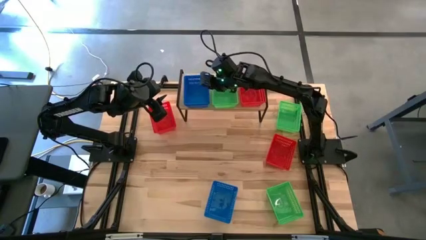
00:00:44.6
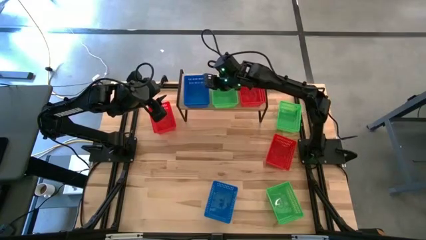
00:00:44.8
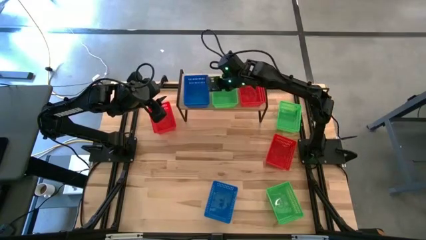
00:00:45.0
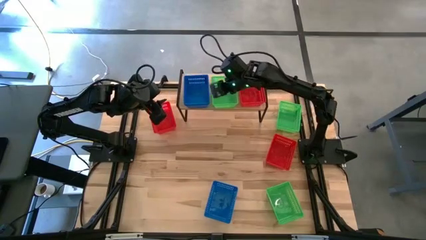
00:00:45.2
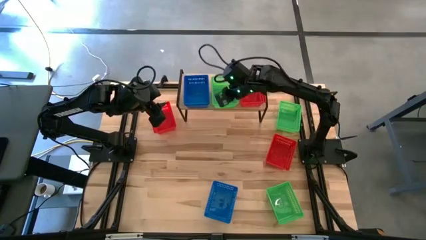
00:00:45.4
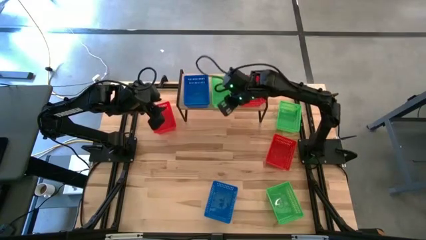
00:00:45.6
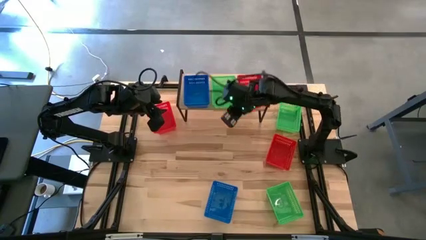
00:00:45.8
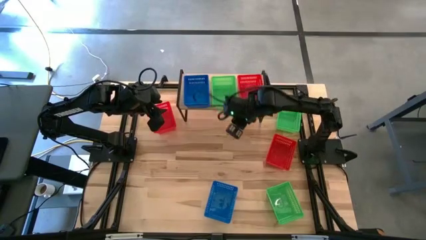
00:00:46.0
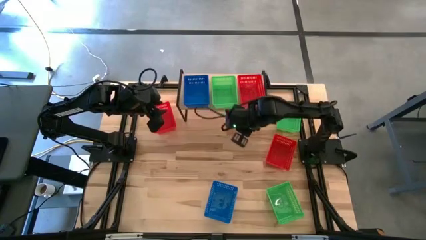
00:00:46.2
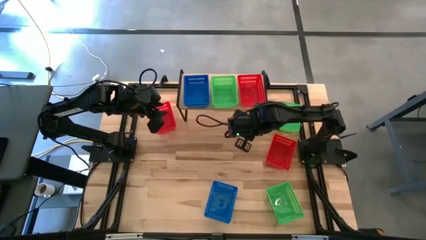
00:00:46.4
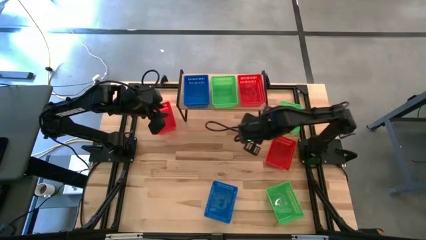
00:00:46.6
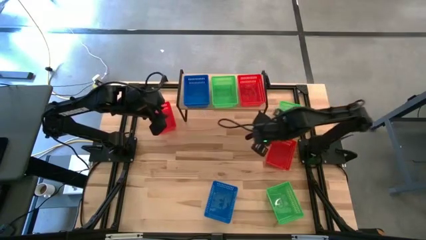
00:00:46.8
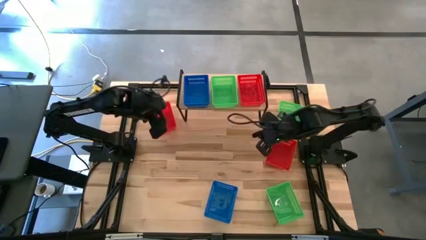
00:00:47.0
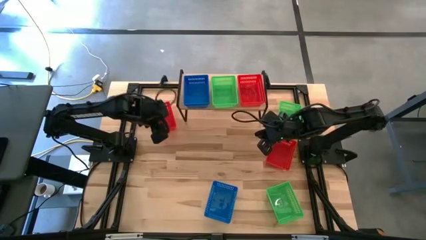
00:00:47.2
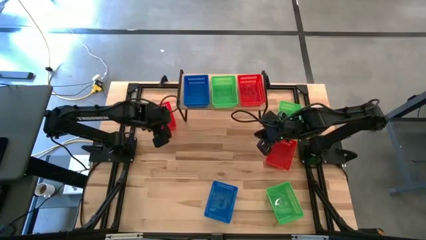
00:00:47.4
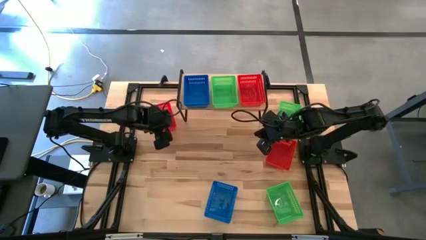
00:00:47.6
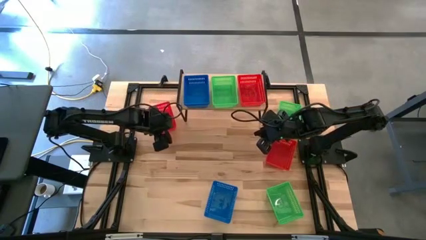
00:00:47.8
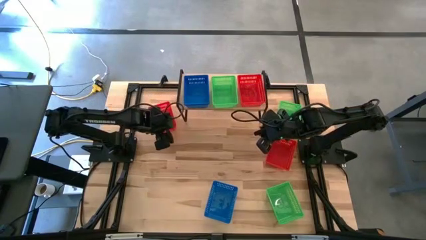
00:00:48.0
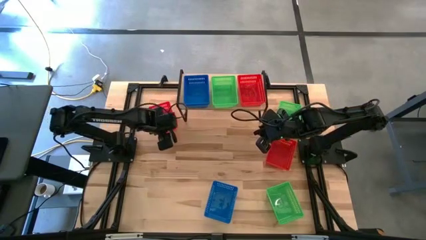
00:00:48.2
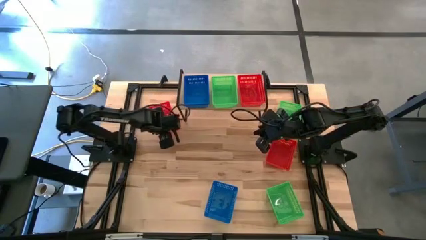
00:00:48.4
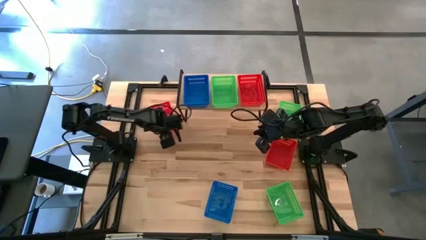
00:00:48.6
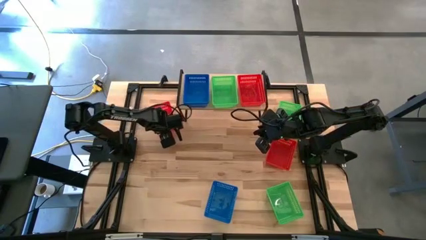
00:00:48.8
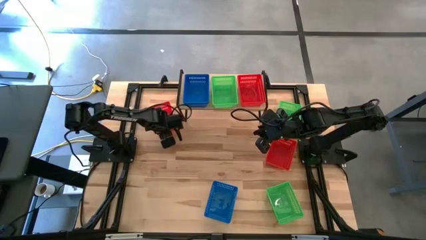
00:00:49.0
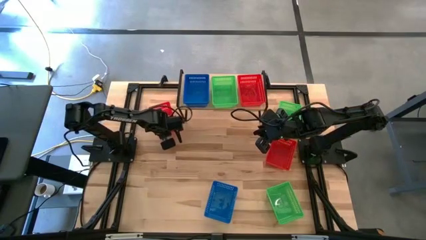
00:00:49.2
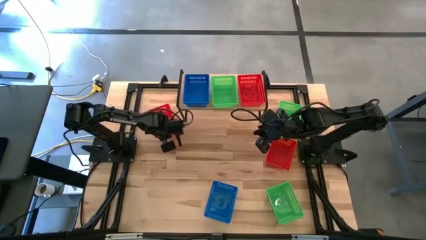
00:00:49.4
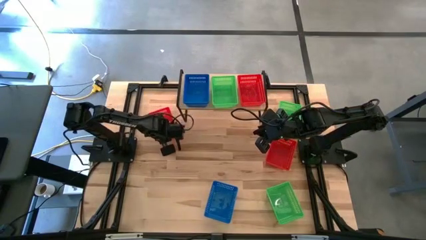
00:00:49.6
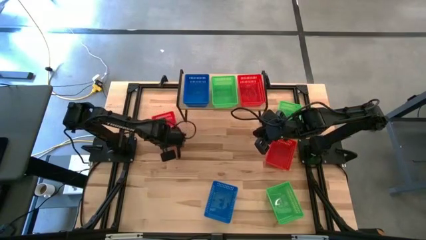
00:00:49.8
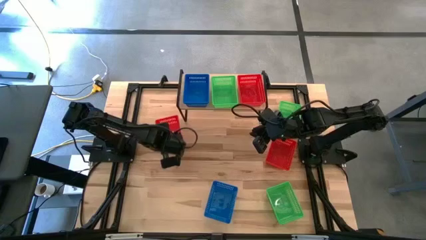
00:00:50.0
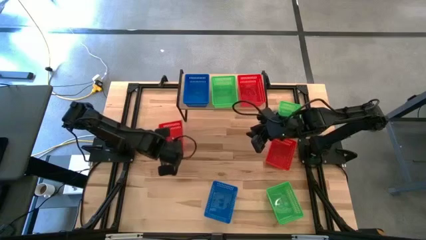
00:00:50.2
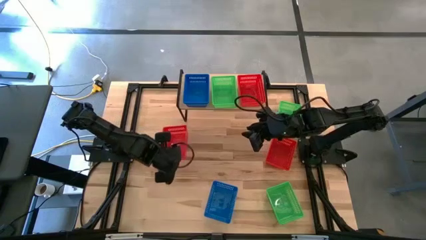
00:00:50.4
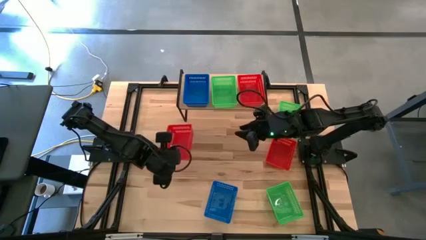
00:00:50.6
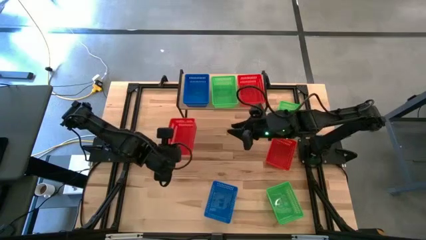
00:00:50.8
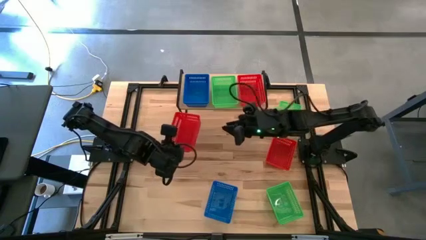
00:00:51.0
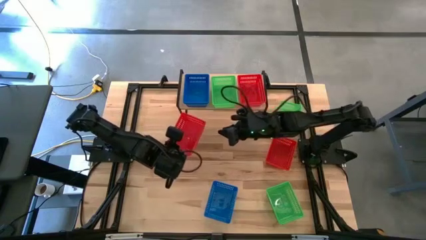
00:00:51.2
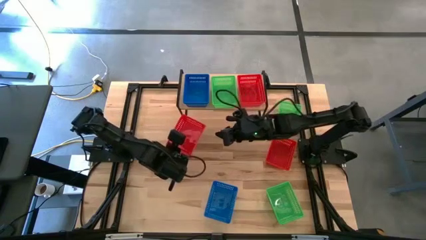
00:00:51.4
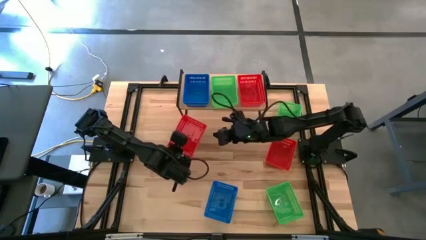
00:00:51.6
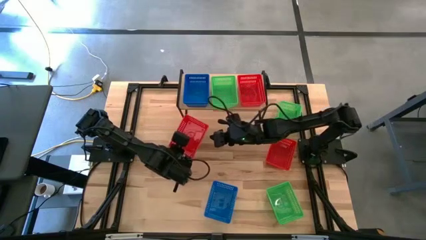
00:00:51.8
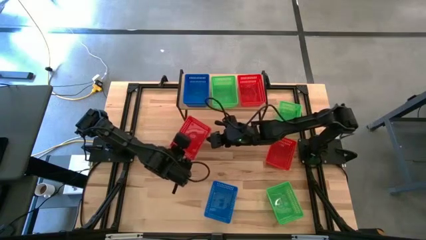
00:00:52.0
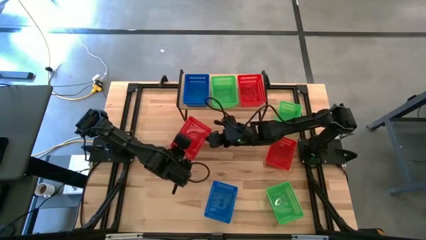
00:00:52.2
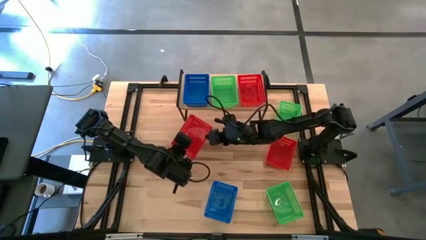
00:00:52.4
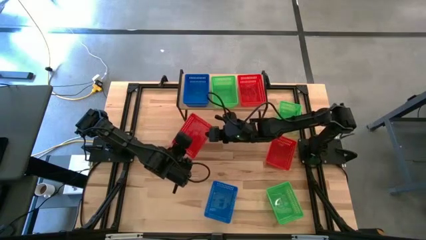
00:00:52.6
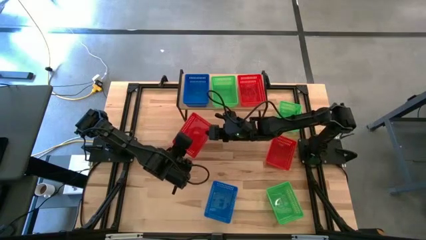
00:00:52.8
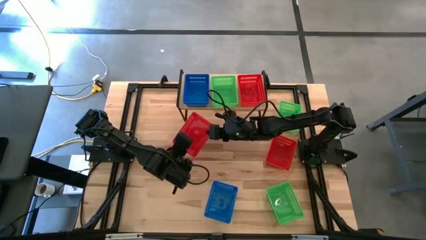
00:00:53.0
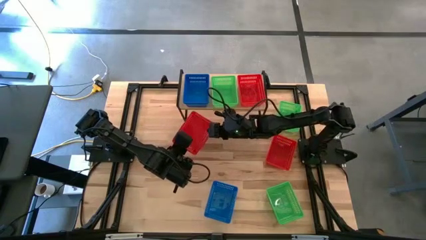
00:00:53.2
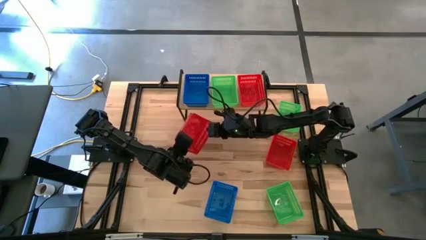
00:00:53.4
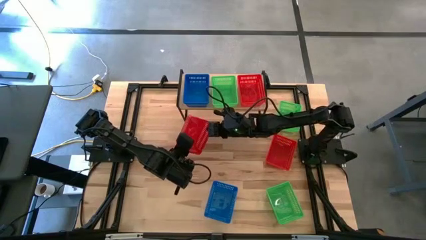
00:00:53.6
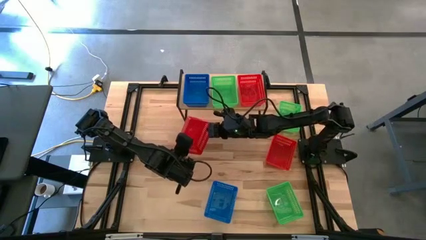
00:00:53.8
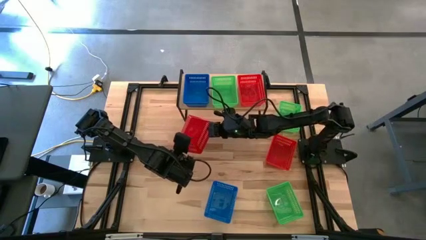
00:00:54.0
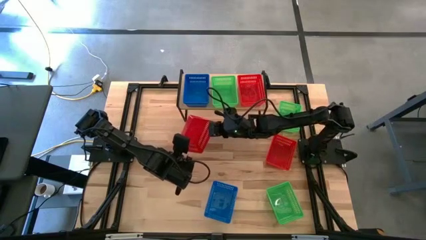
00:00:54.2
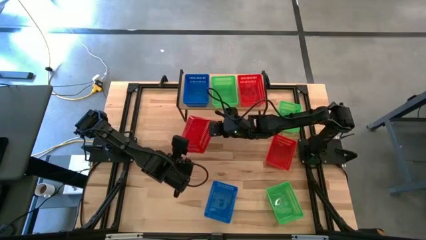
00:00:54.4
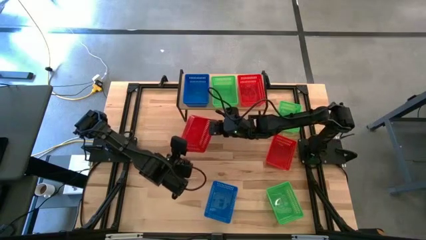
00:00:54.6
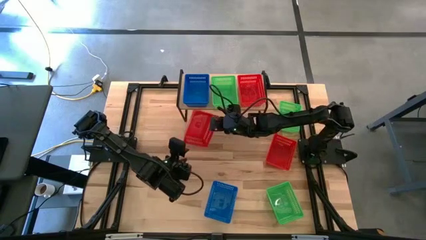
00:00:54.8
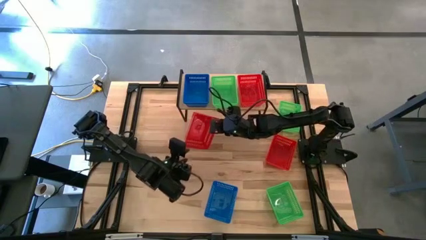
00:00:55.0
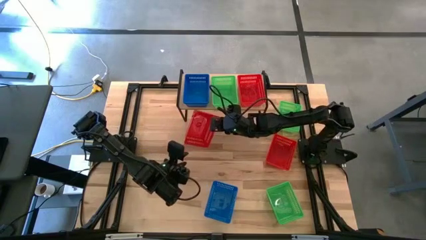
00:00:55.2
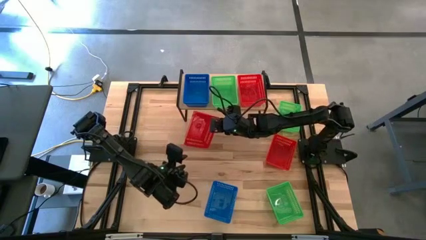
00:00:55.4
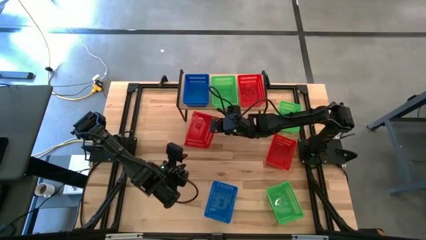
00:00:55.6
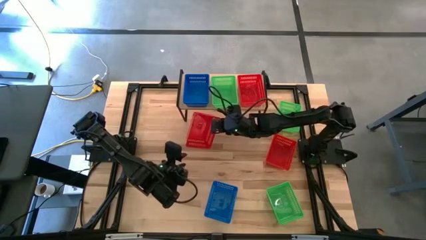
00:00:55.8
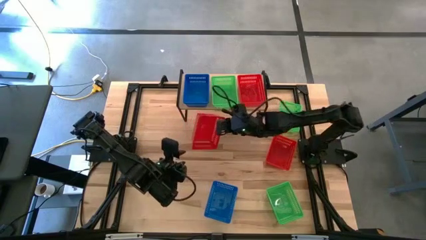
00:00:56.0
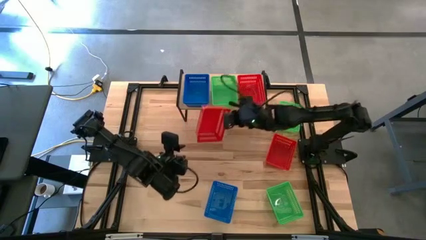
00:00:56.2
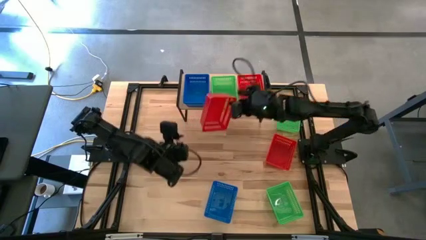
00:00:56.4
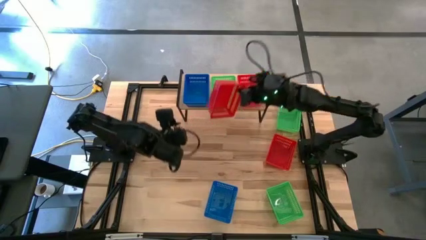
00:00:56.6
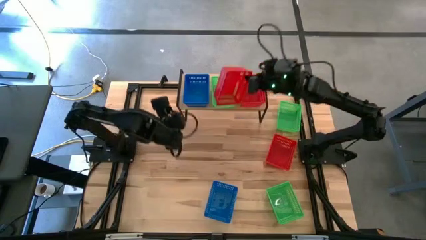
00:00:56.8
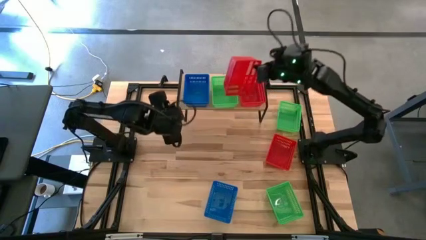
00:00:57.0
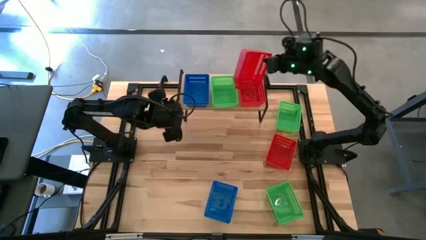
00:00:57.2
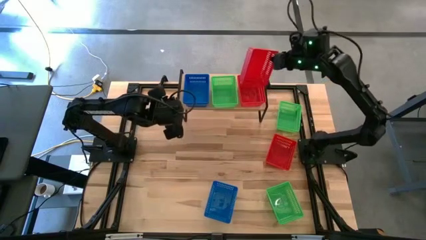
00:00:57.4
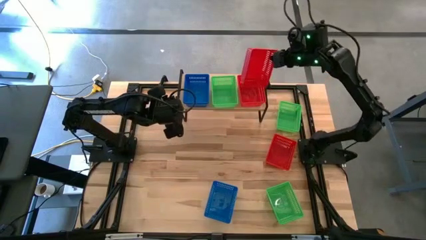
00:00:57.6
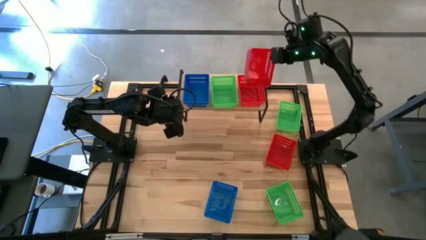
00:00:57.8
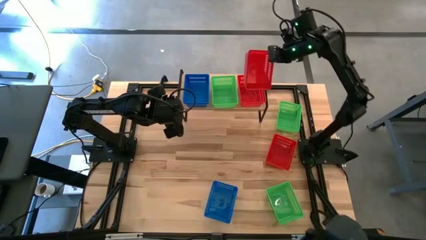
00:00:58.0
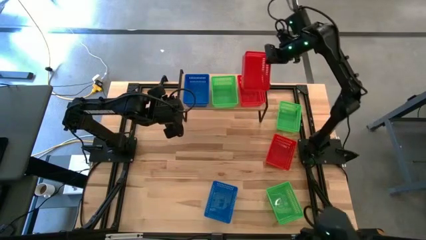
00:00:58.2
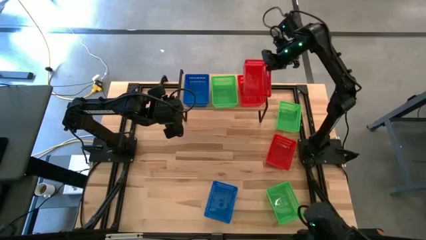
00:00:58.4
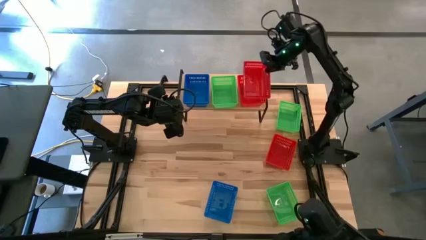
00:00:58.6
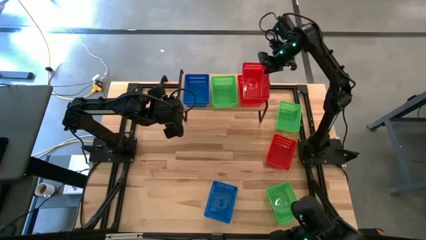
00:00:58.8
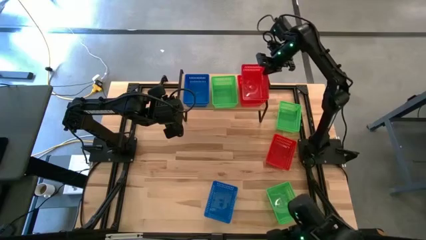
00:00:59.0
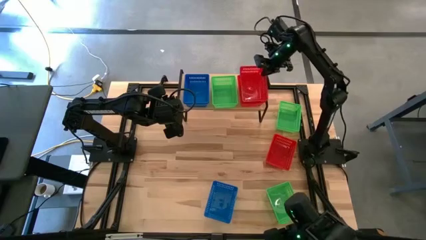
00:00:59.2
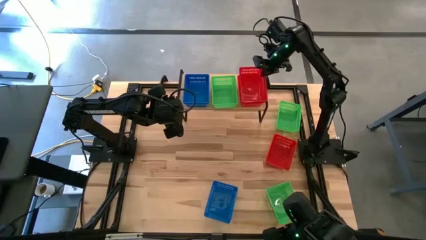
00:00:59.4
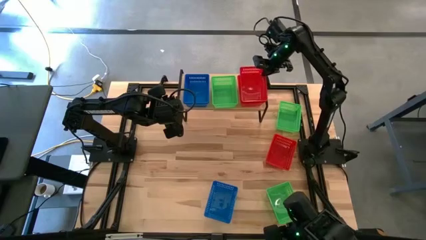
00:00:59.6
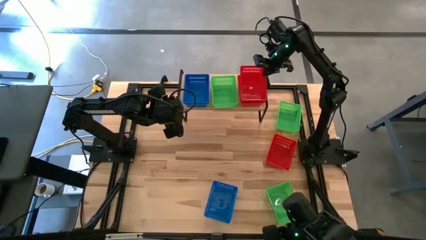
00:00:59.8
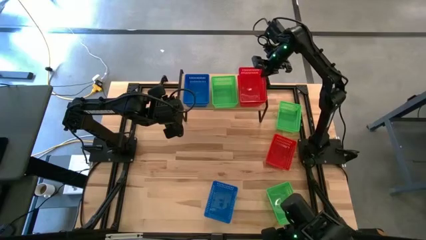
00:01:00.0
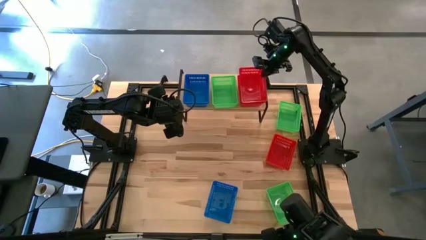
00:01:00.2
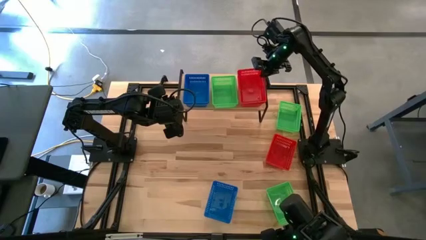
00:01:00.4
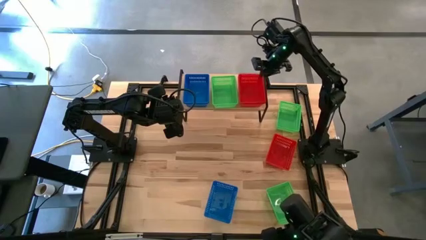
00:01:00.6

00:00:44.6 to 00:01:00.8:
Task: Stack baskets on shelf by color
Stack the left red bin on top of the other red bin on the shelf
